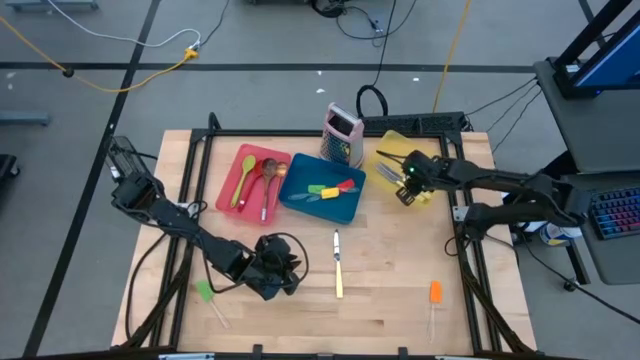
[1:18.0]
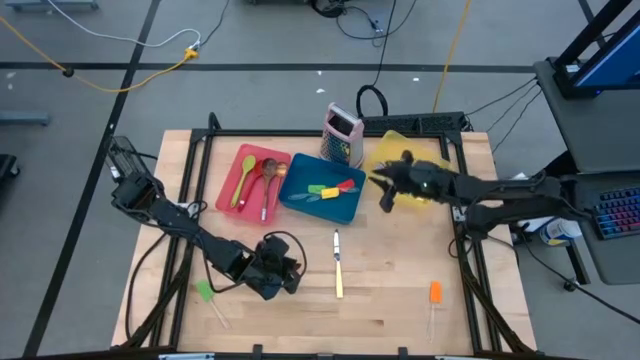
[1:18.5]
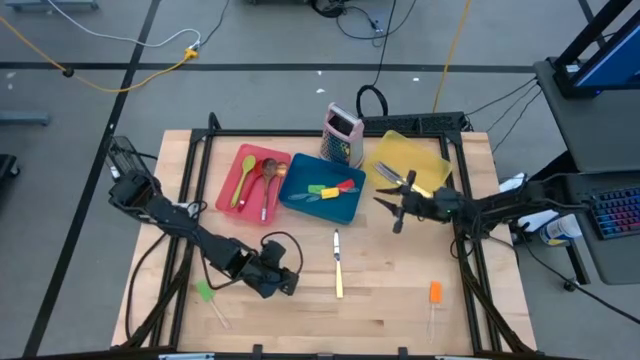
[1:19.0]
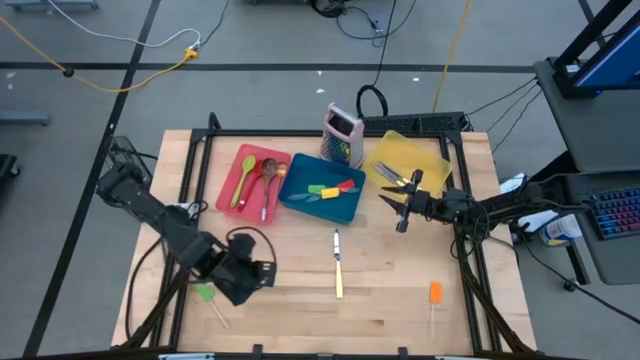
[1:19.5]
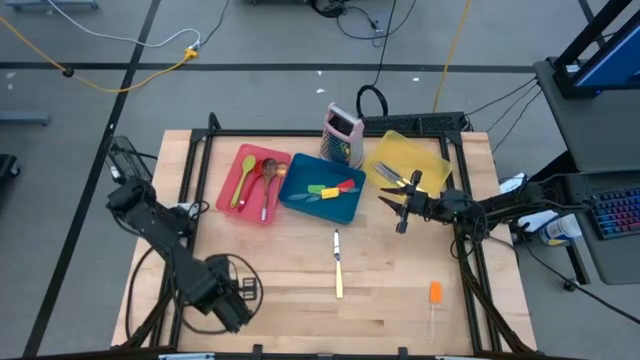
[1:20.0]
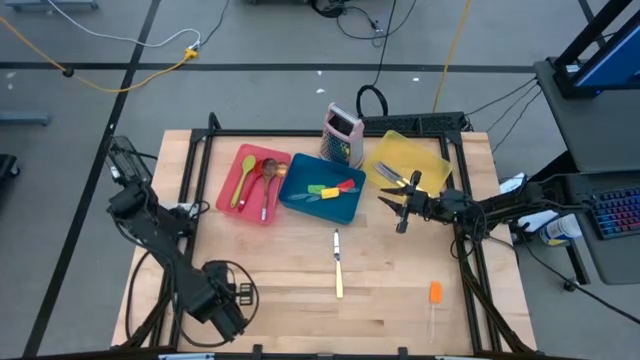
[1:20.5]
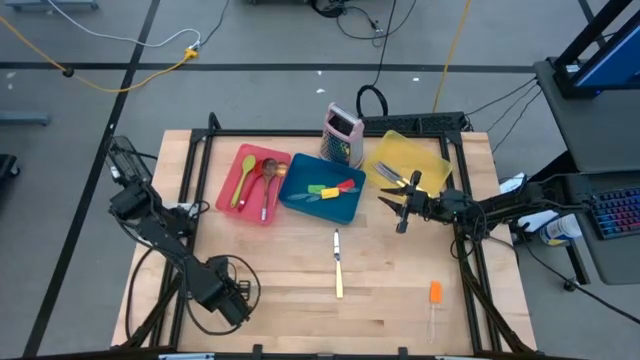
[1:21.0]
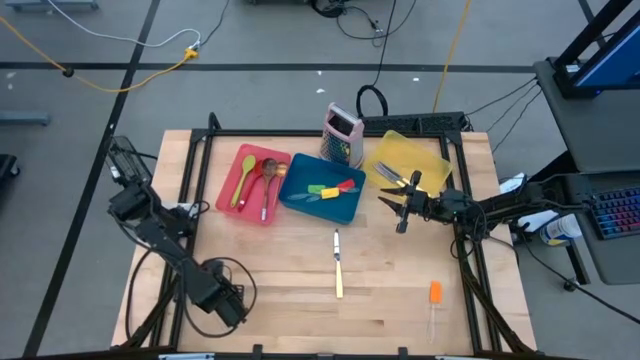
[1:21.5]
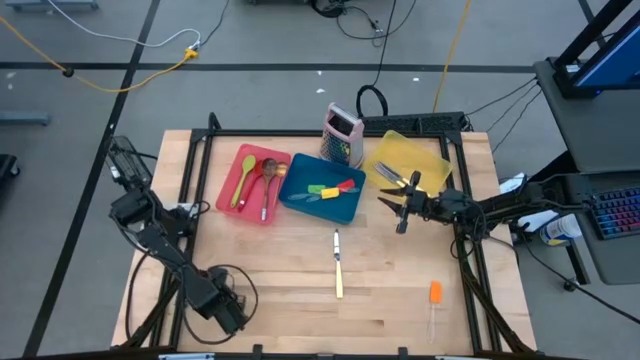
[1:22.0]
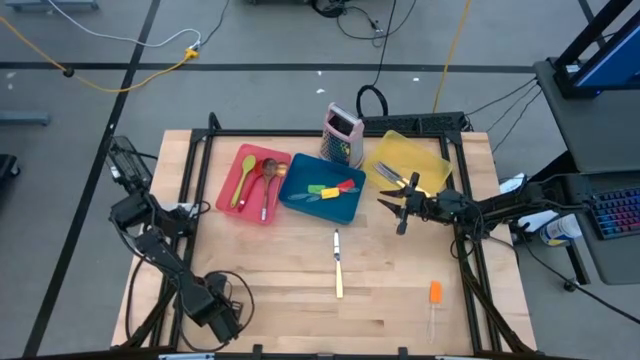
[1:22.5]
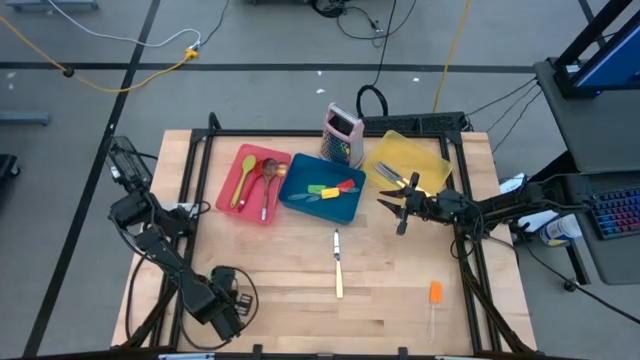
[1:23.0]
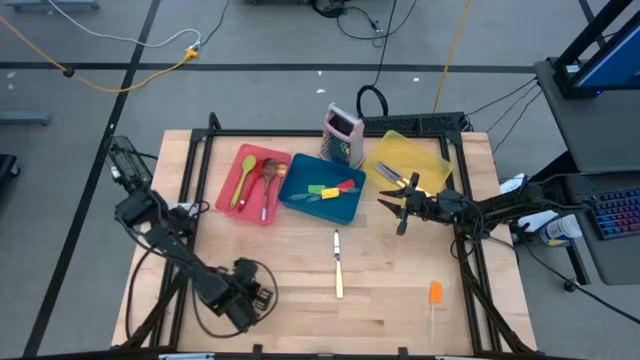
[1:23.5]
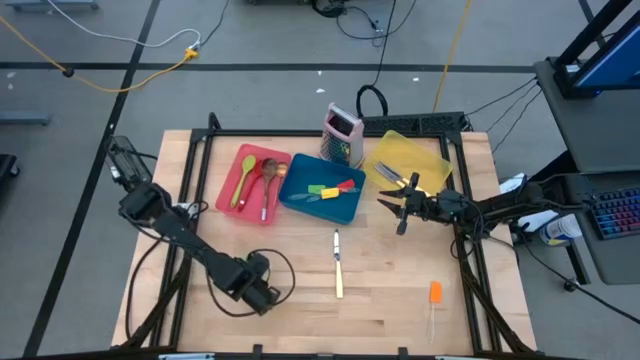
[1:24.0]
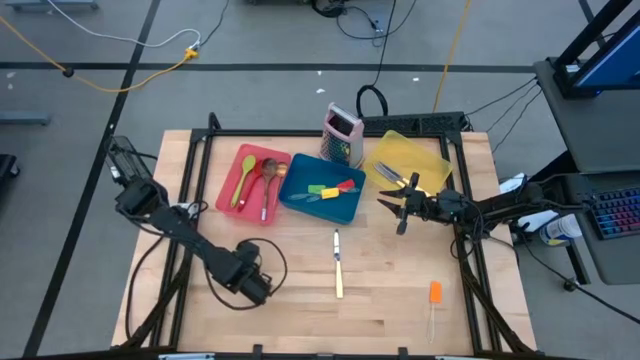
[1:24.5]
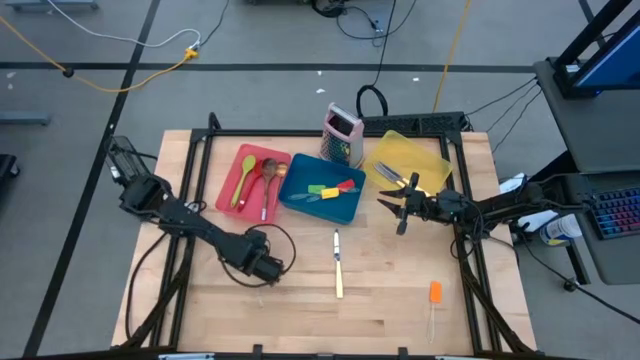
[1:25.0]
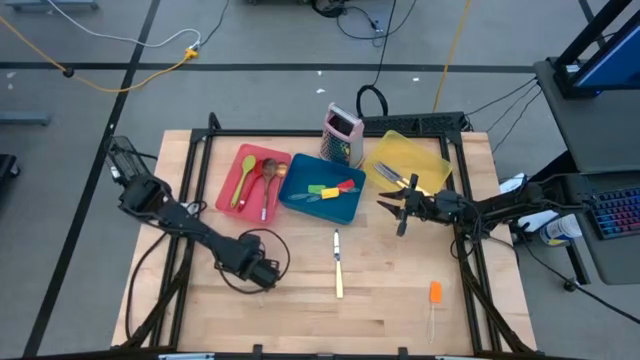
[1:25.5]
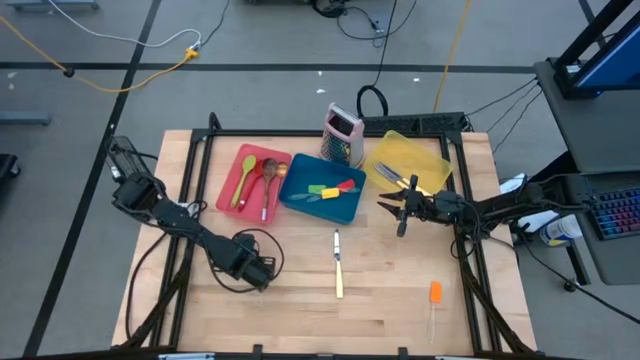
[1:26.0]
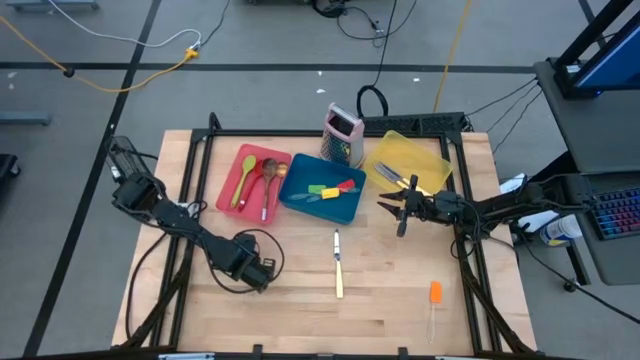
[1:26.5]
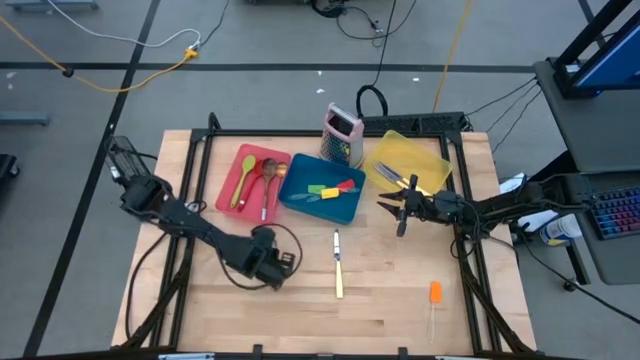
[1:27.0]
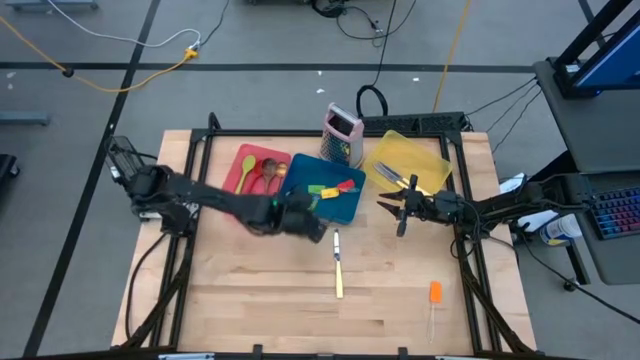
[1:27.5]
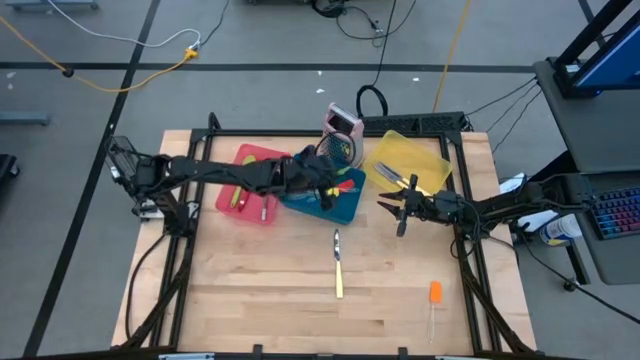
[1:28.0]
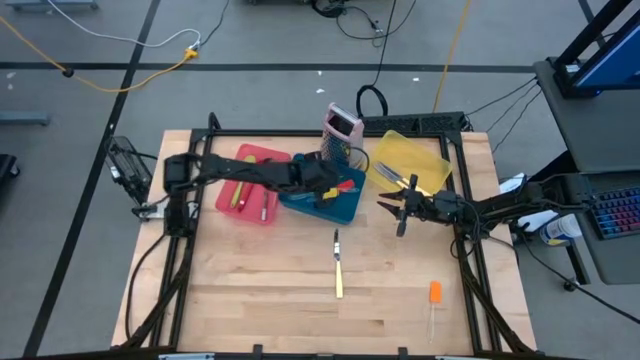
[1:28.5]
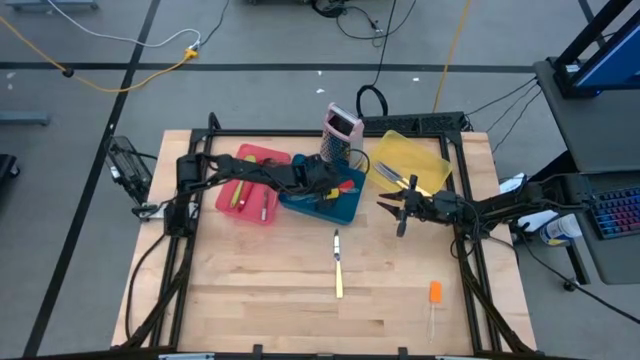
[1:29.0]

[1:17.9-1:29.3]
Task: Pick & Place Kitchen Items
Put the green spatula into the blue bin

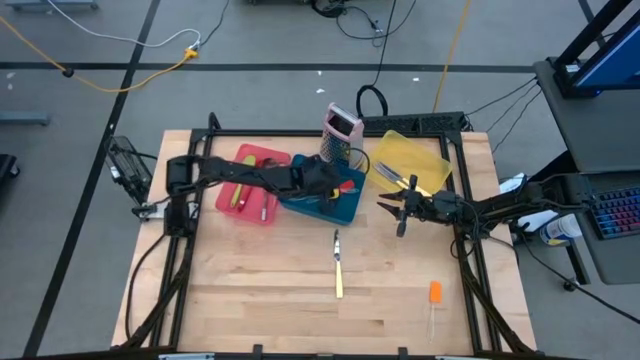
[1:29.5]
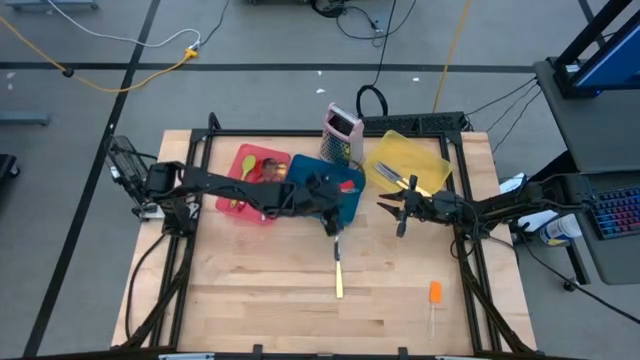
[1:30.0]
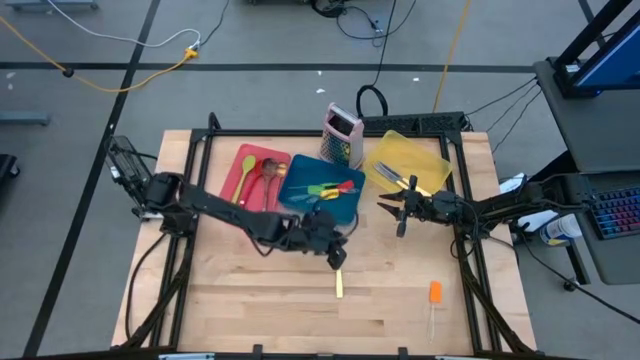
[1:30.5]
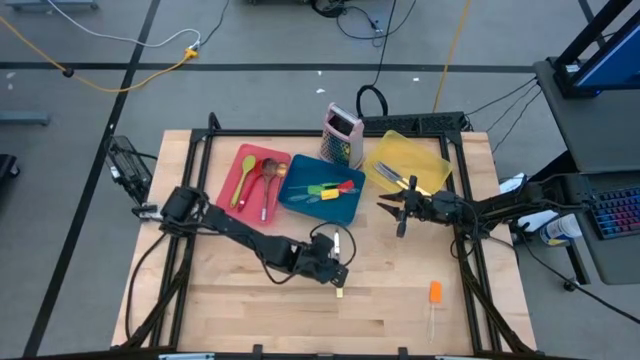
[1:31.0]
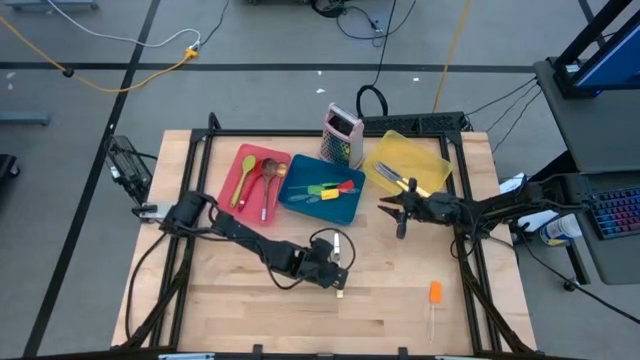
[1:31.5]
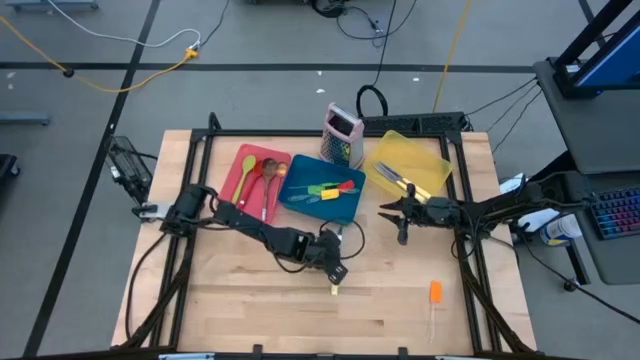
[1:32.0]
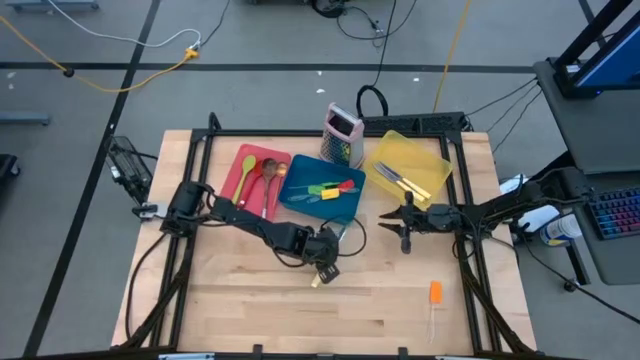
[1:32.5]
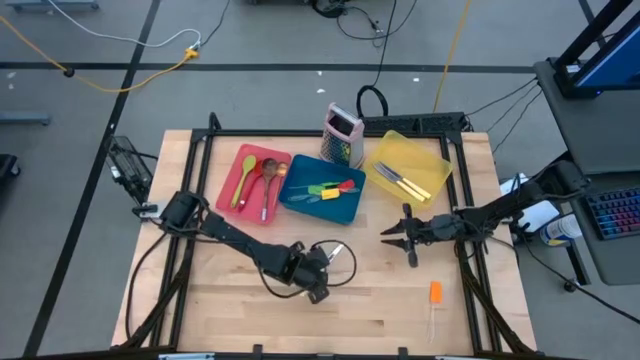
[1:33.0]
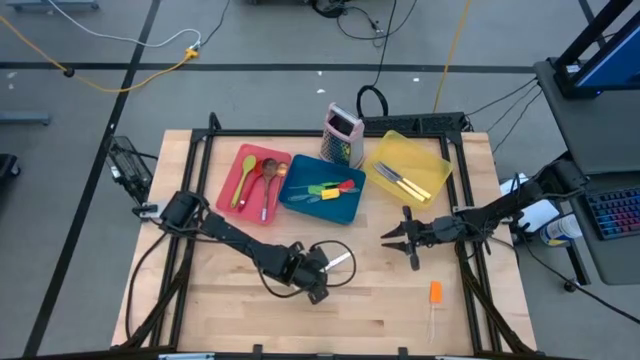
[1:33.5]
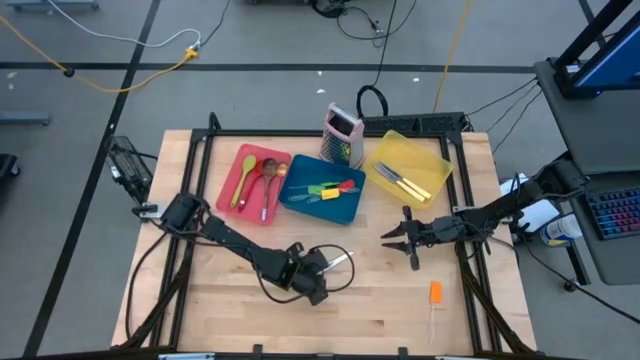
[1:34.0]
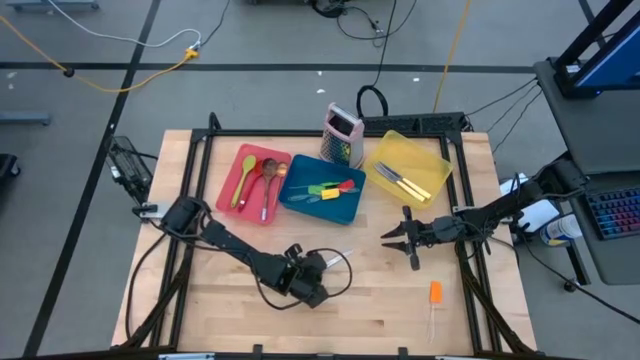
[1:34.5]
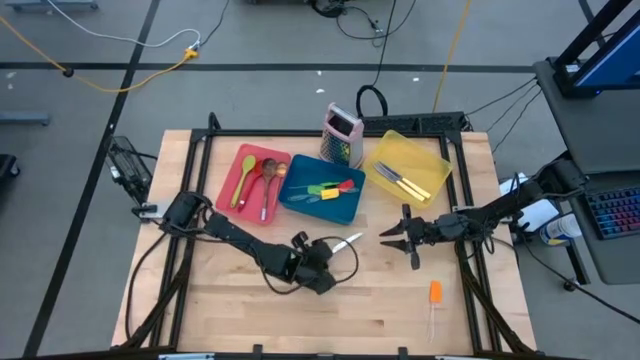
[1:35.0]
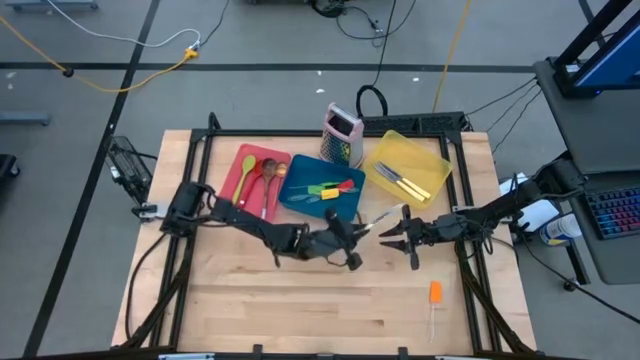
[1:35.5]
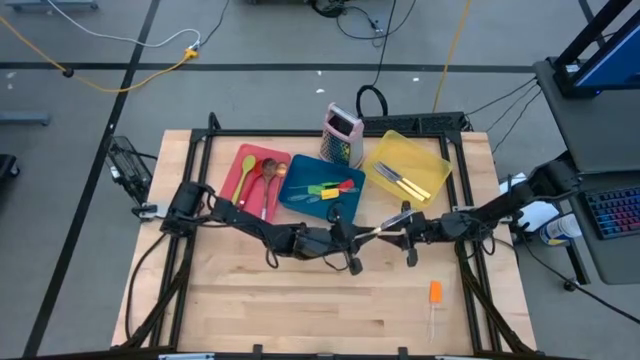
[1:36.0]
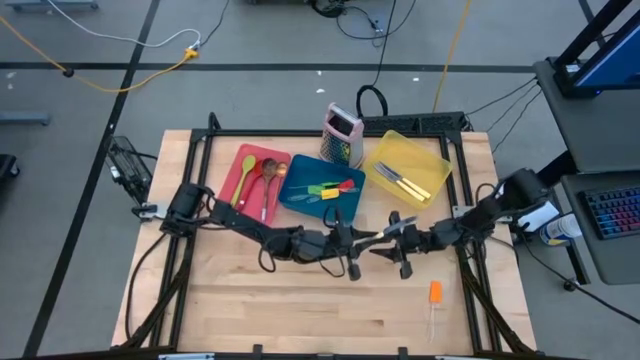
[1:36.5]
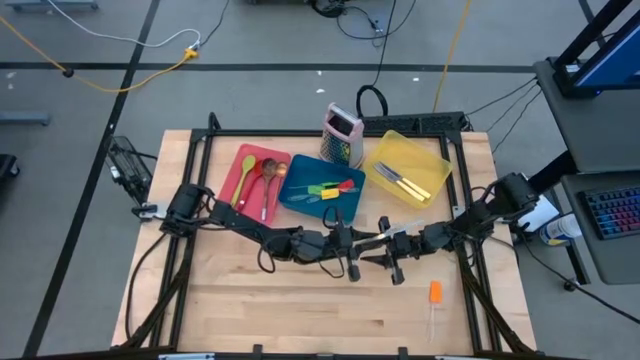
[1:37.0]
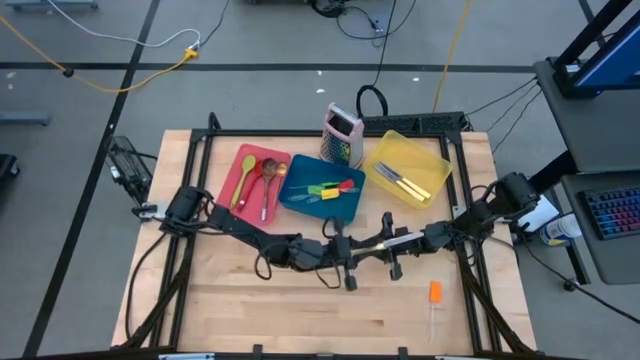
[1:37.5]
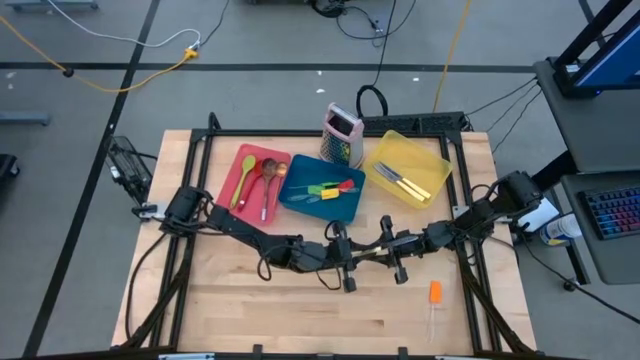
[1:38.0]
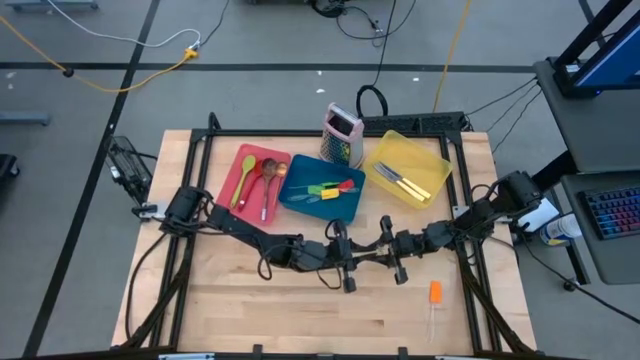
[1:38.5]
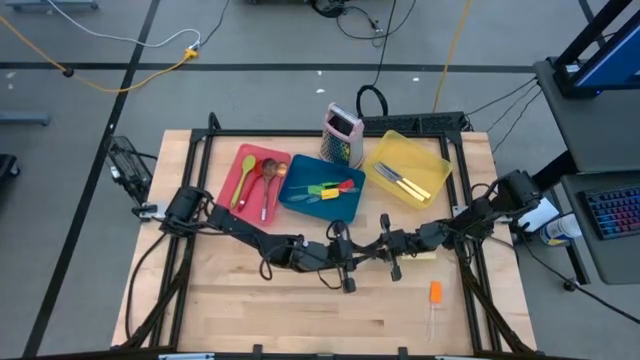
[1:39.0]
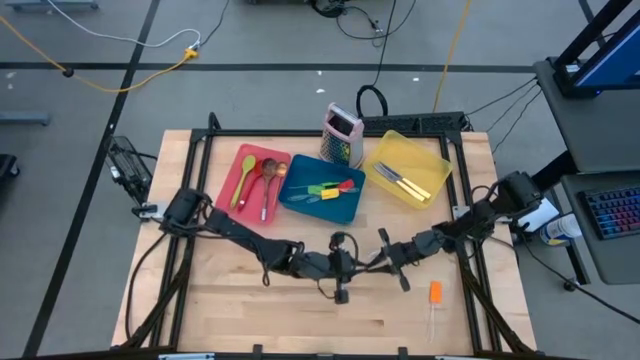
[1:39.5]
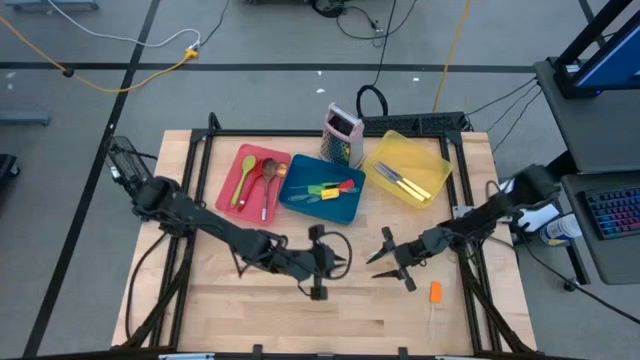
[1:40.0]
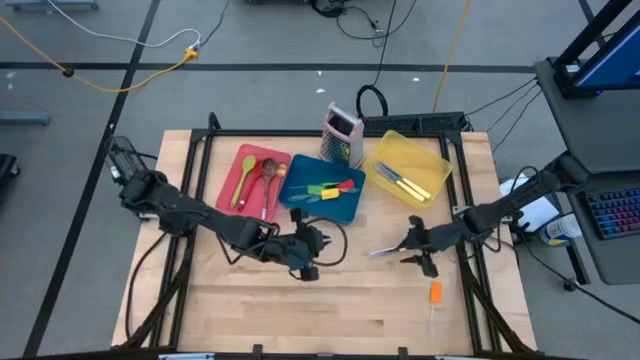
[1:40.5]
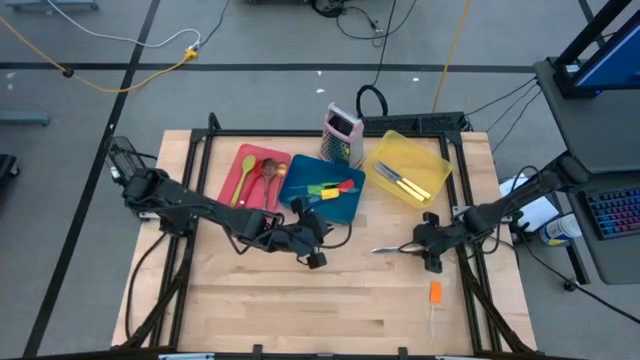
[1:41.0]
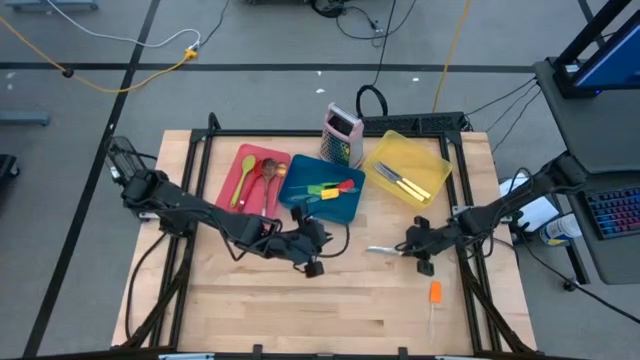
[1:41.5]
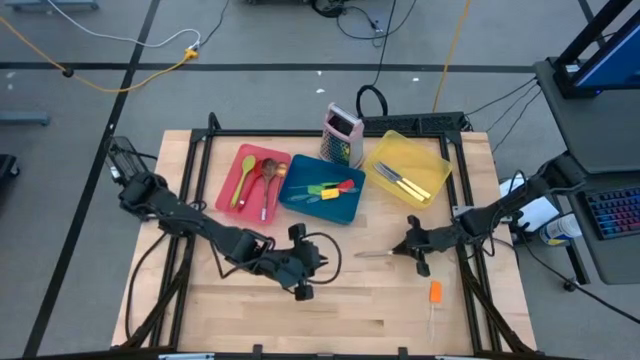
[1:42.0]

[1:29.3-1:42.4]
Put the yellow knife into the yellow bin
